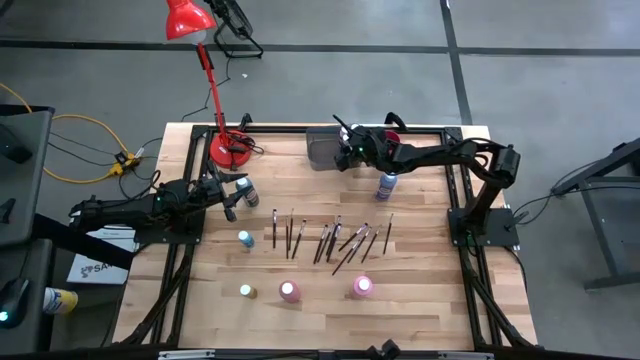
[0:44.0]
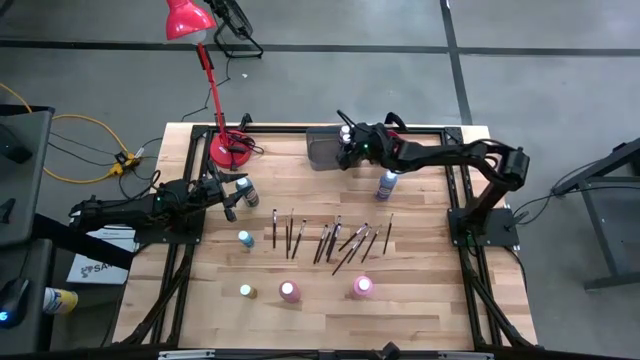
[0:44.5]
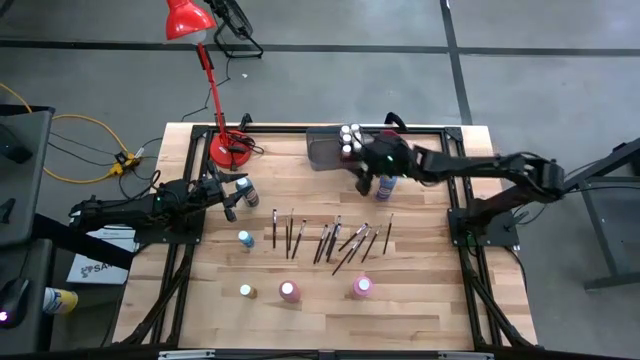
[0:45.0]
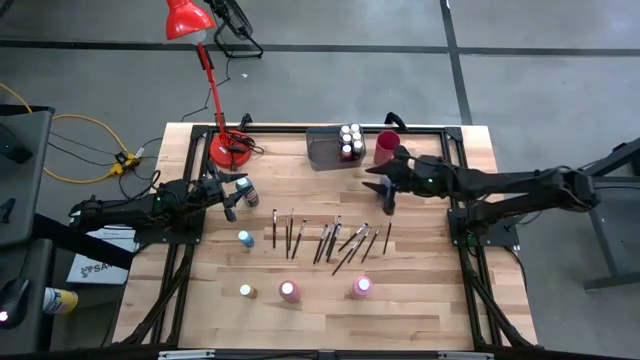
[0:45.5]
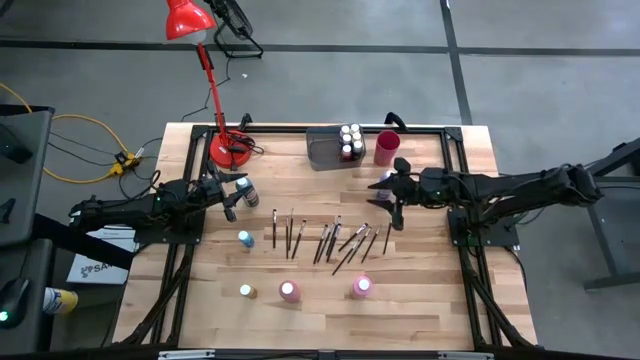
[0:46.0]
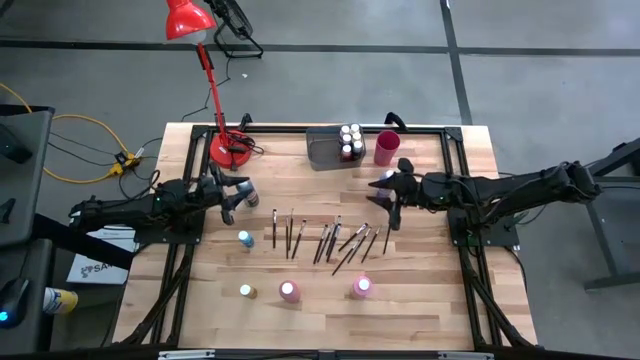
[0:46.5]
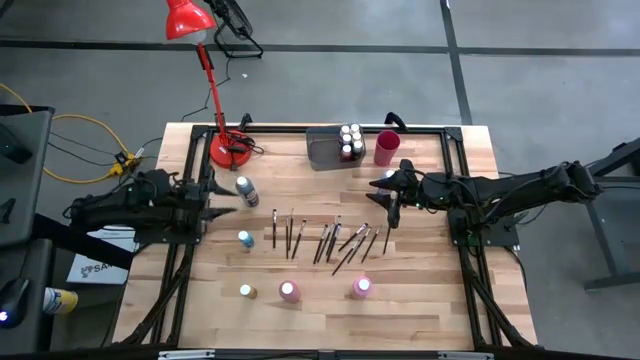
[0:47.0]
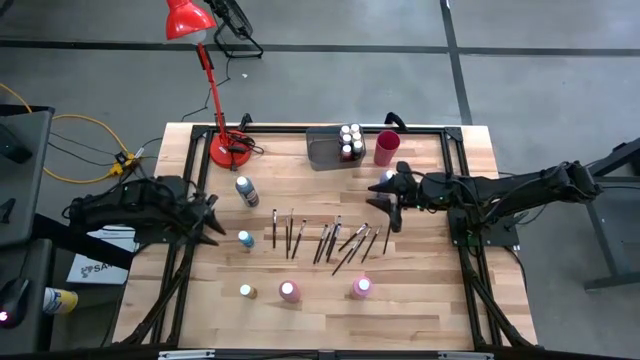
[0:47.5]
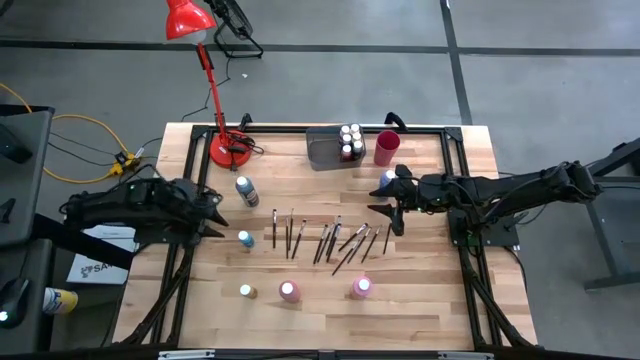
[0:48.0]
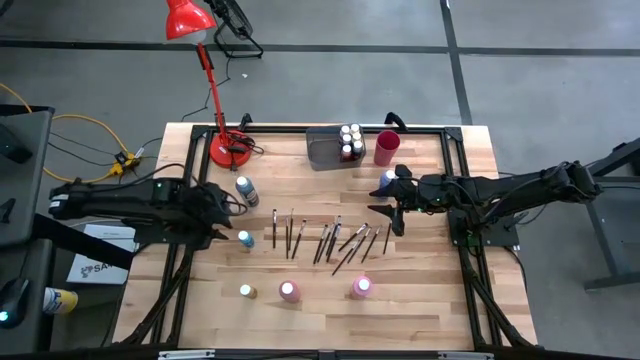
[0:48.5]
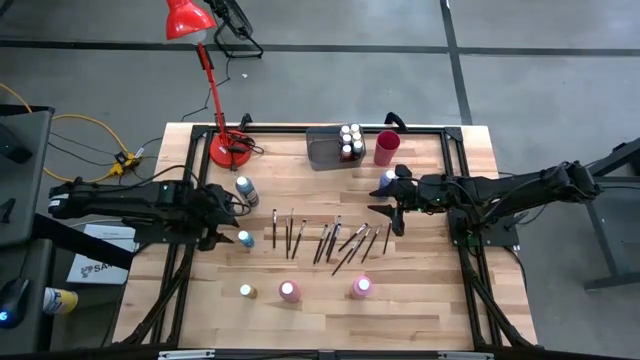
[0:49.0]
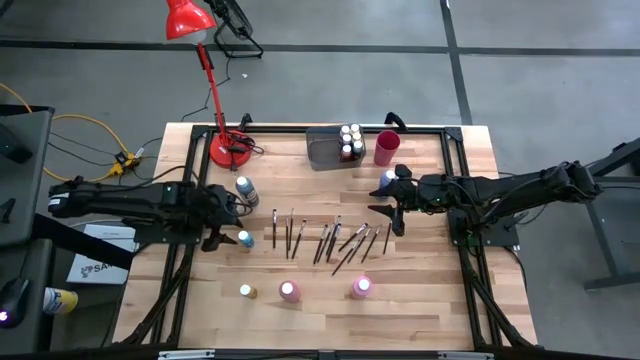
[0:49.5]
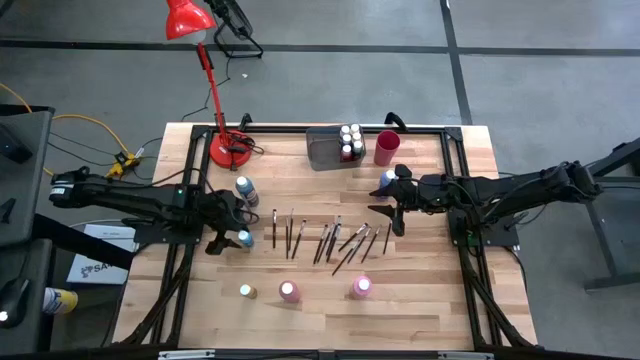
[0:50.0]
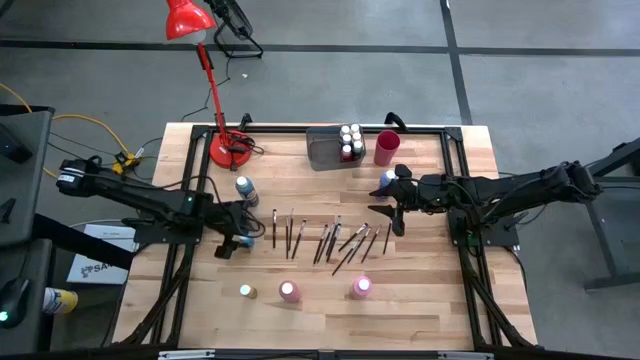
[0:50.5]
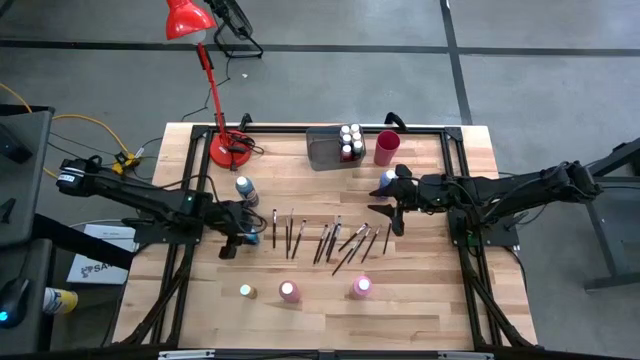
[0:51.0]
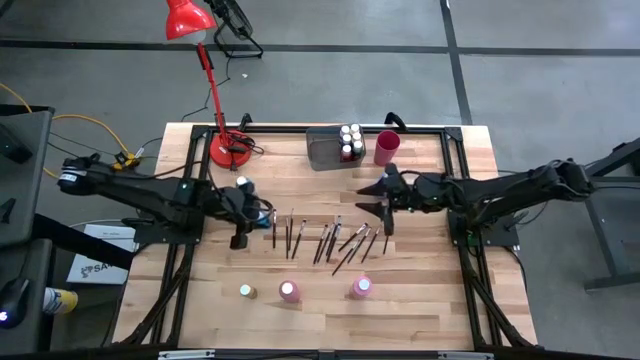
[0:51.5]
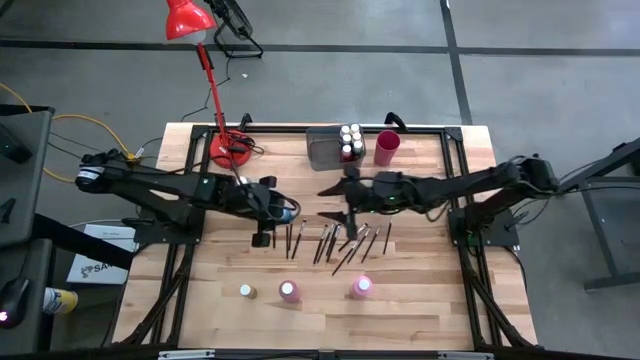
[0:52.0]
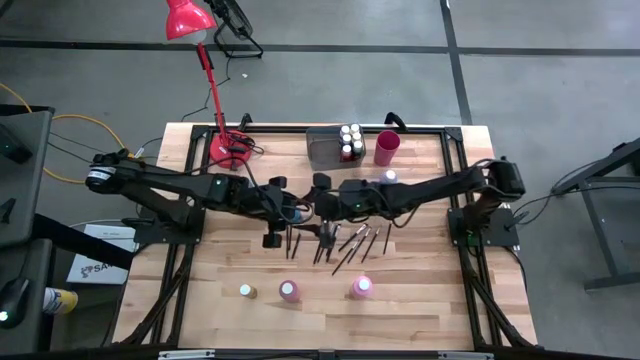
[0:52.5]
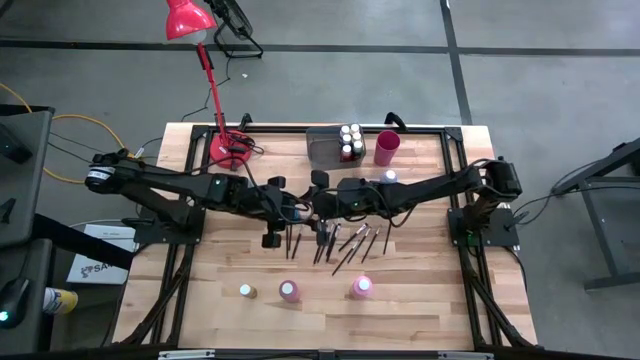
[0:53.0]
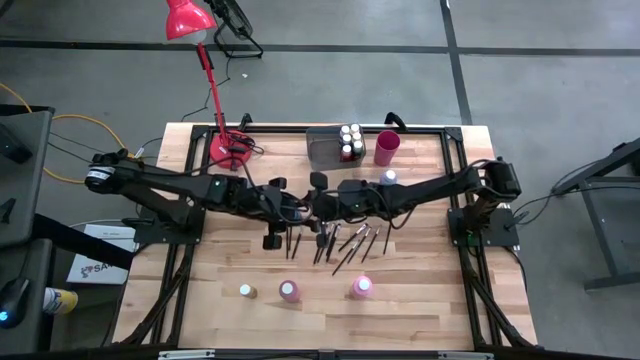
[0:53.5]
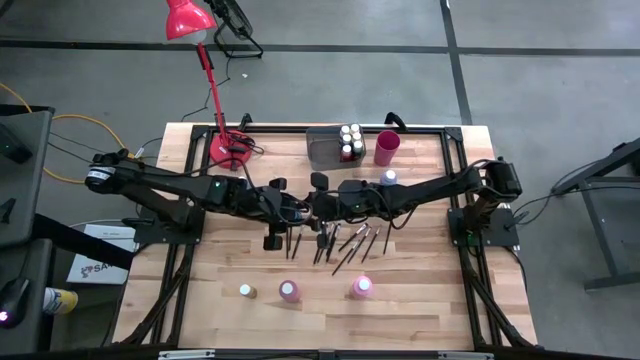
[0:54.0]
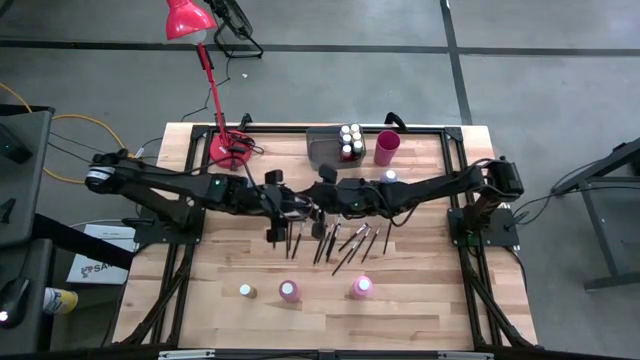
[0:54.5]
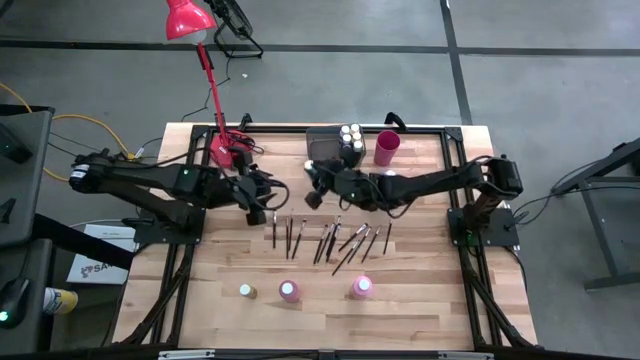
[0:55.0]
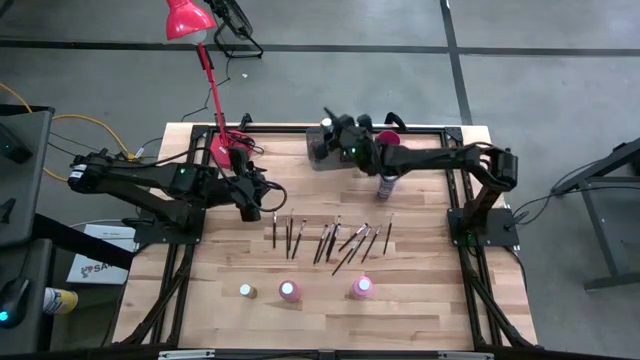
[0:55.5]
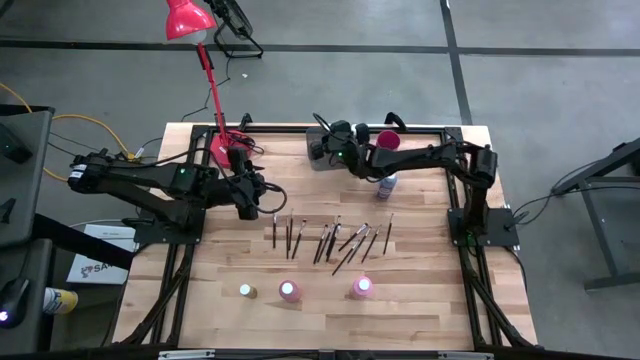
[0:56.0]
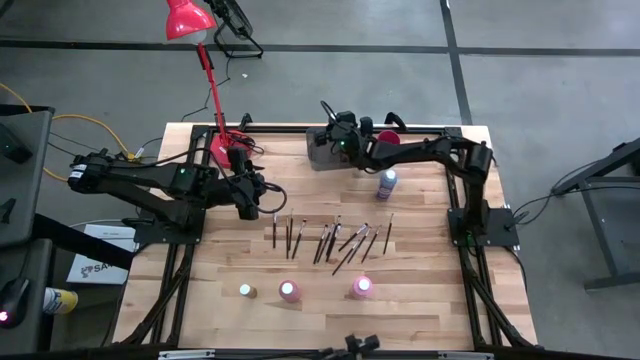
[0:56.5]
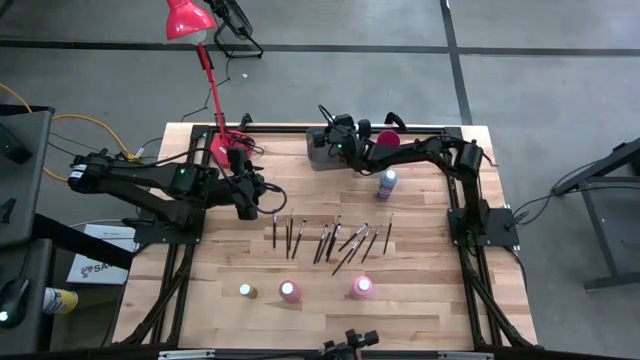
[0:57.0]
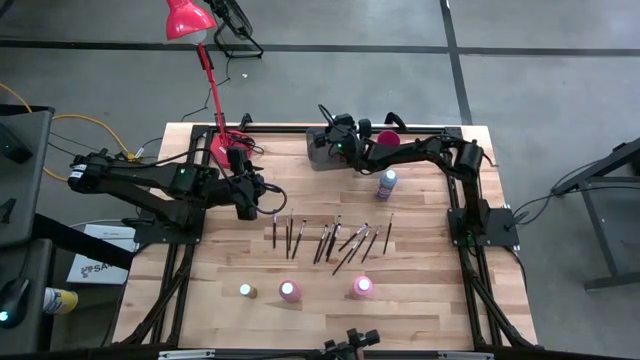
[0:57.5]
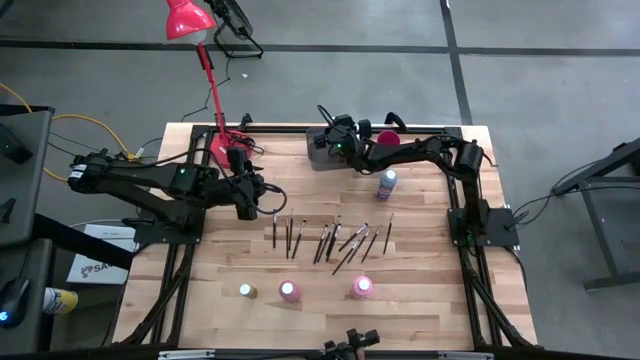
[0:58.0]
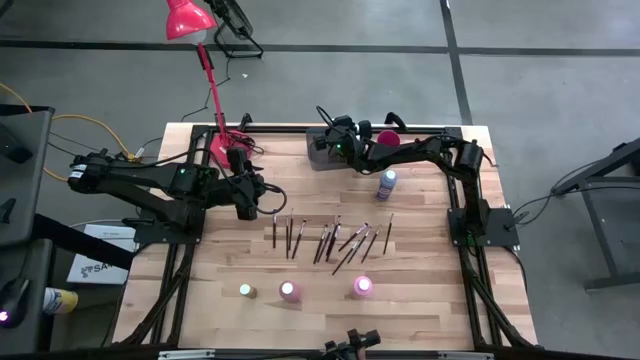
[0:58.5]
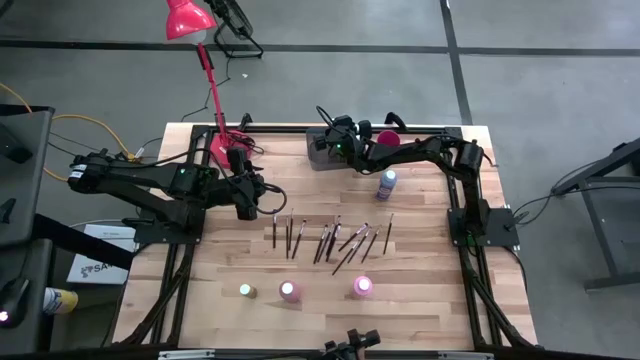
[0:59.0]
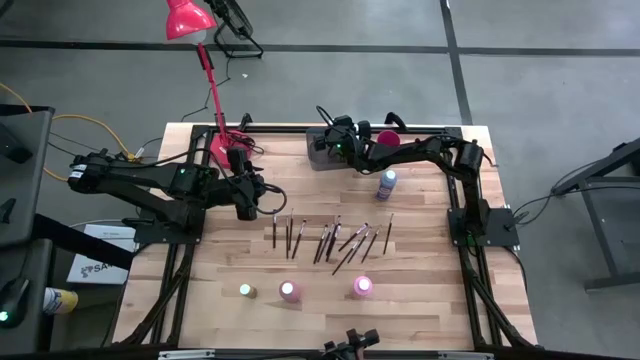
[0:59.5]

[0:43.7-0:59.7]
Task: Pick & Place Paint Supplies
Put the small light blue paint bottle into the black bin

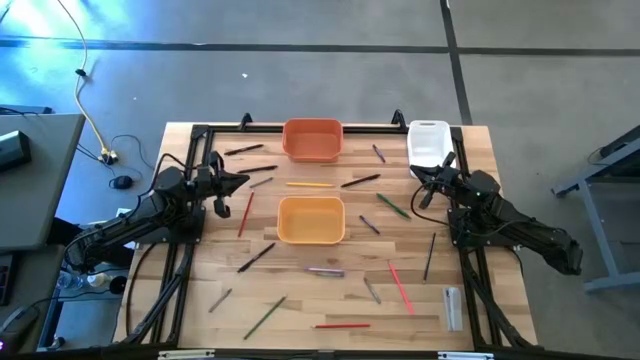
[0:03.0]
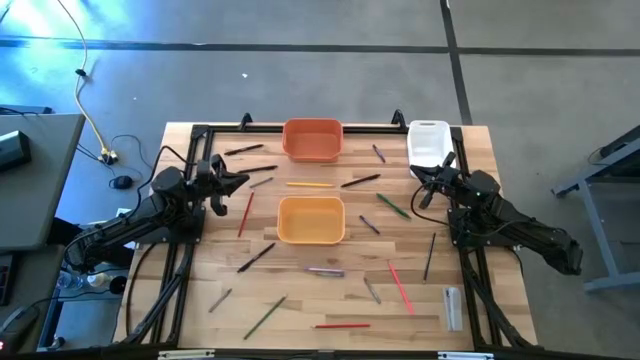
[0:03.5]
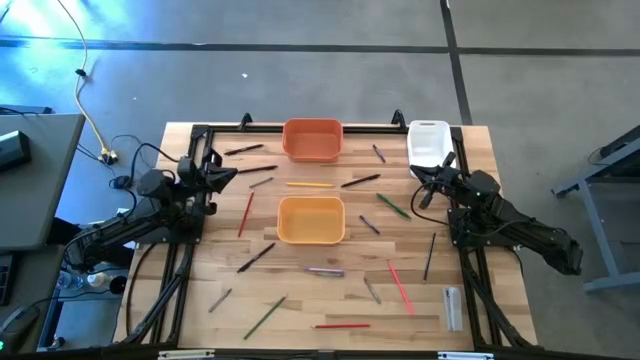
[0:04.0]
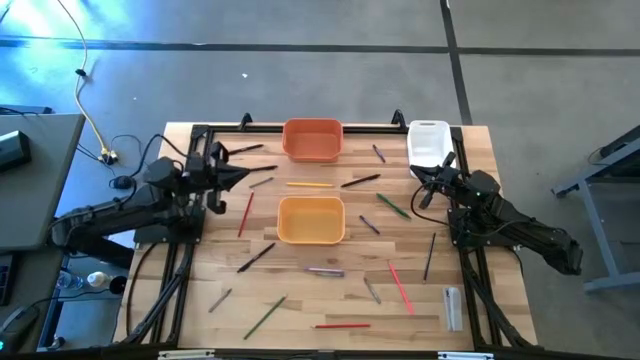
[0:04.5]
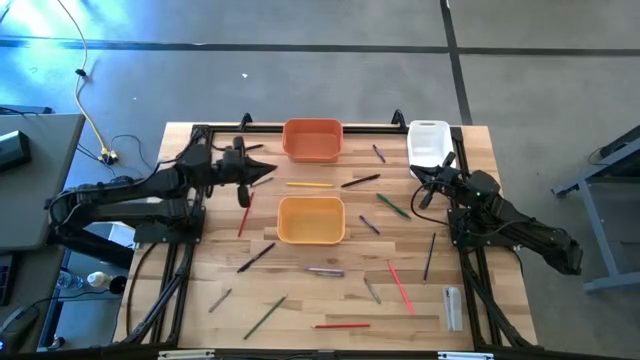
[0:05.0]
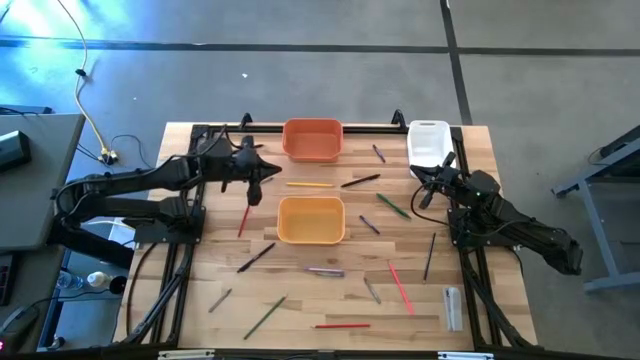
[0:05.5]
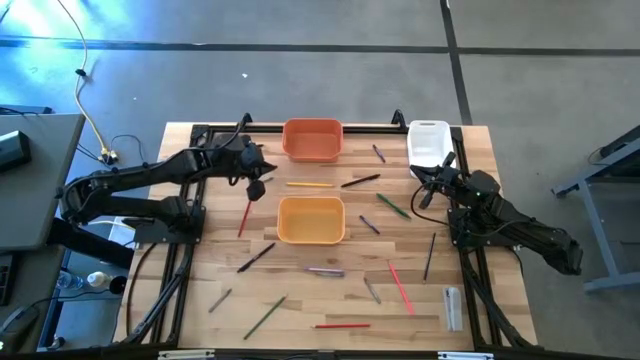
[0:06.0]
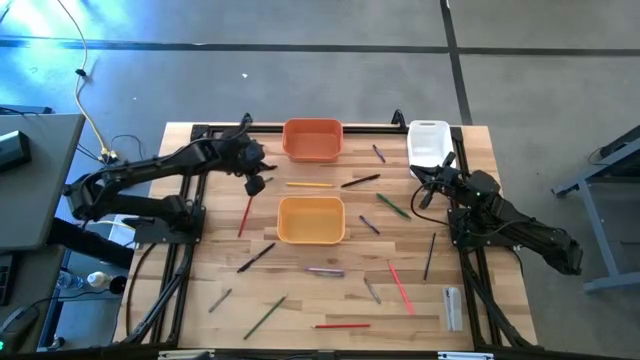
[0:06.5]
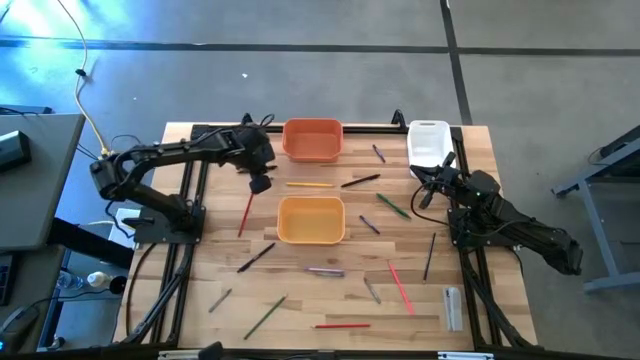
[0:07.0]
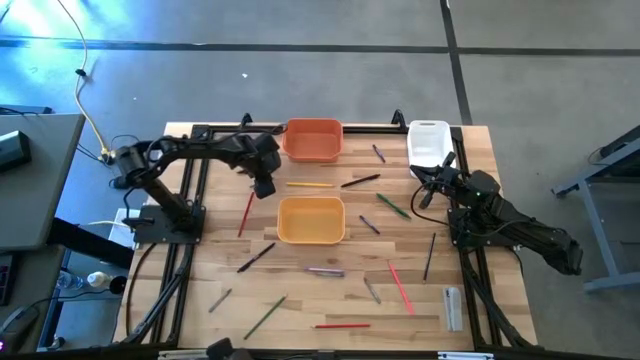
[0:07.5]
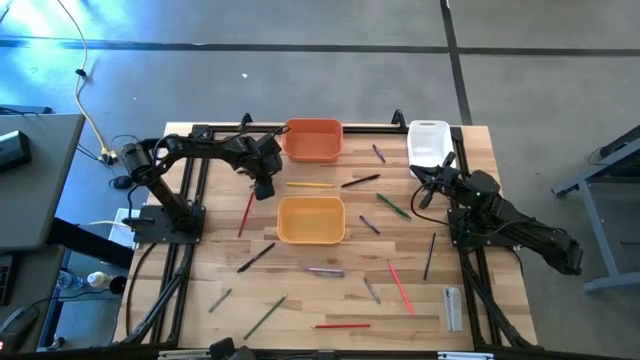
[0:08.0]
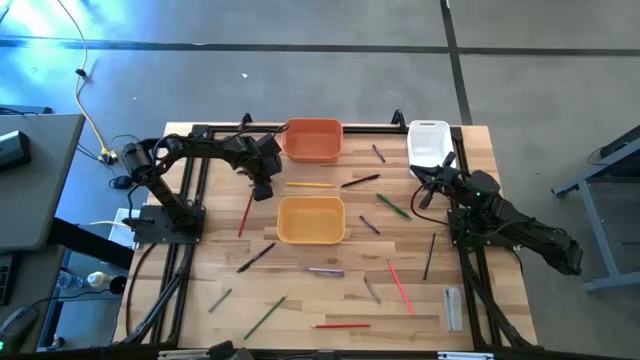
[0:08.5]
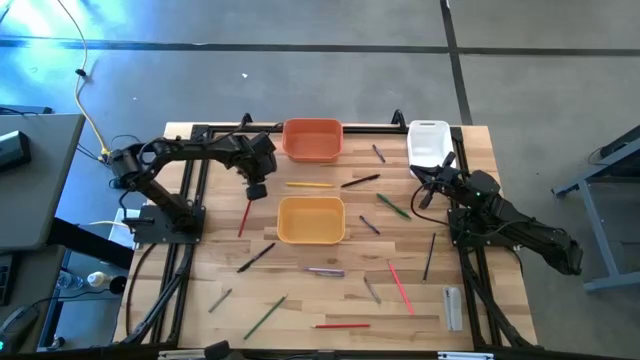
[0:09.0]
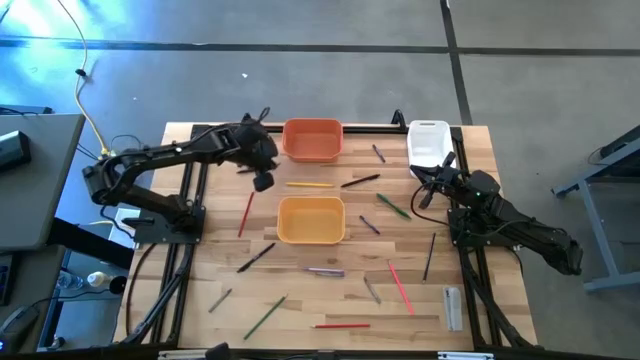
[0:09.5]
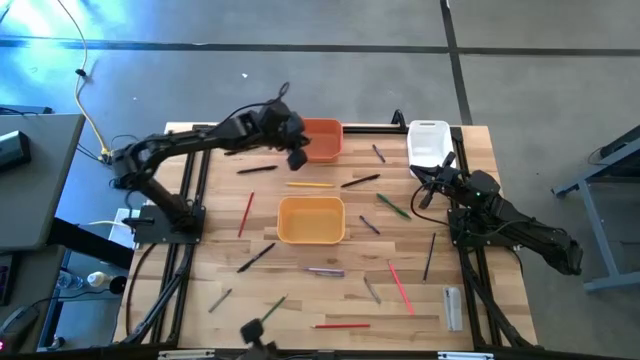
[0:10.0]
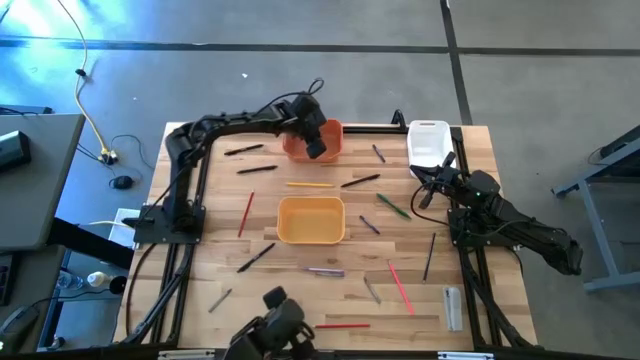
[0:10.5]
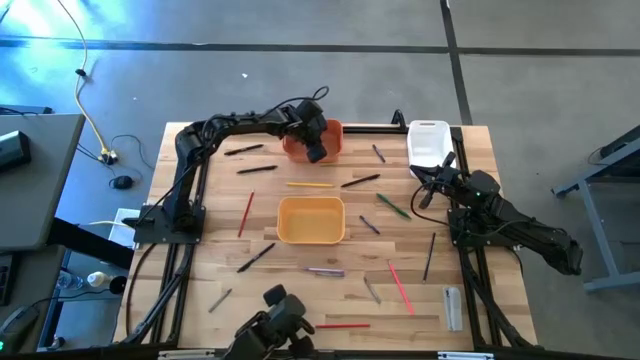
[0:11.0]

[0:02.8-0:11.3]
Task: Sort crayons/erasers/pens/pencils in bins
Put the top left light gray crayon into the orange bin
